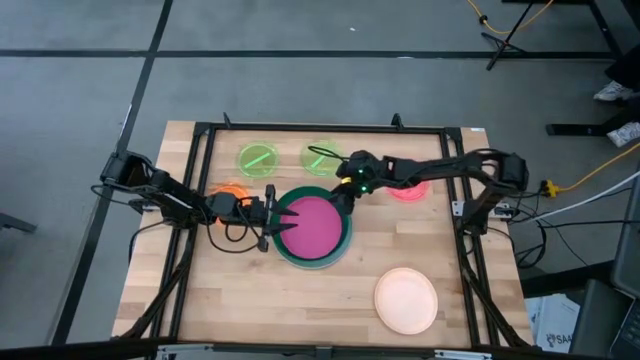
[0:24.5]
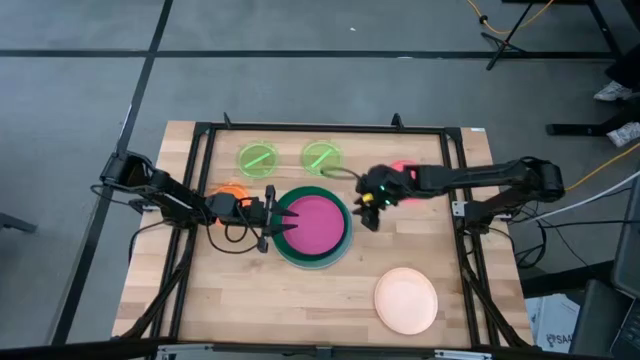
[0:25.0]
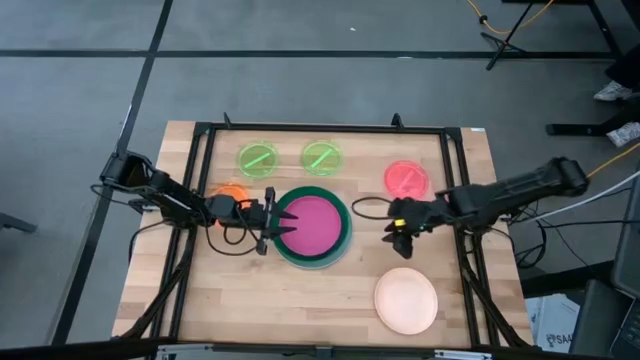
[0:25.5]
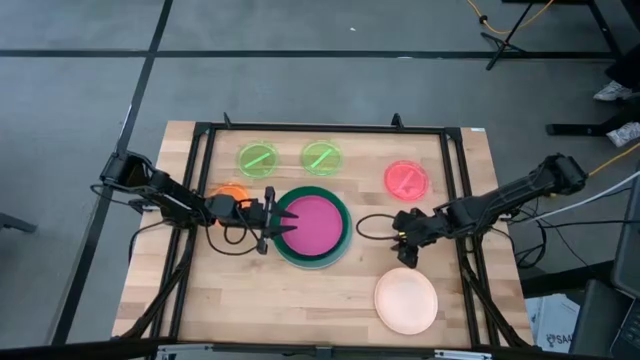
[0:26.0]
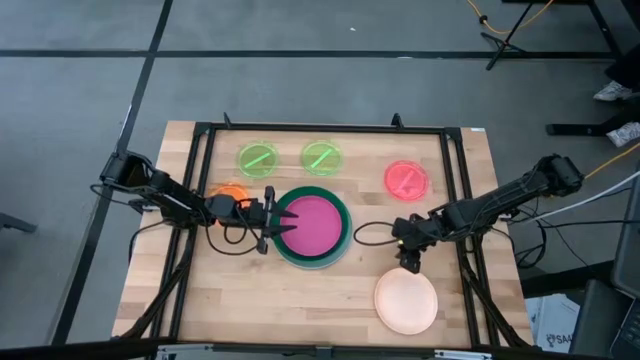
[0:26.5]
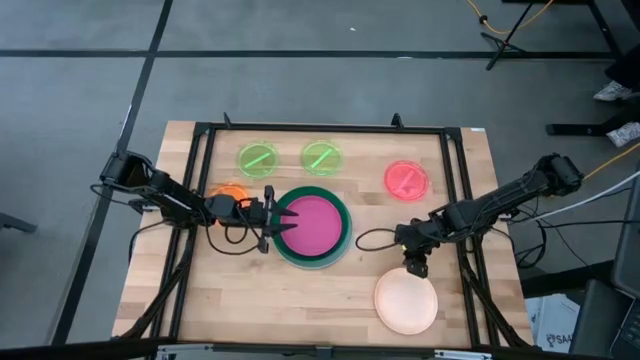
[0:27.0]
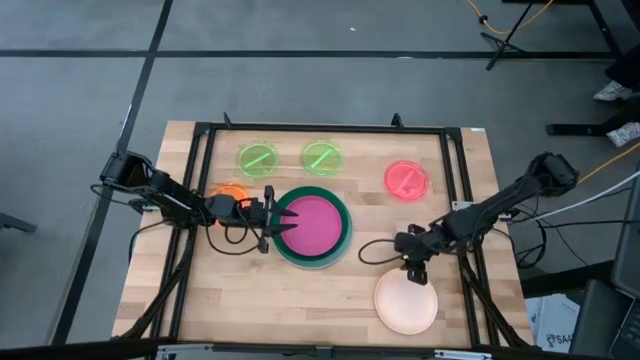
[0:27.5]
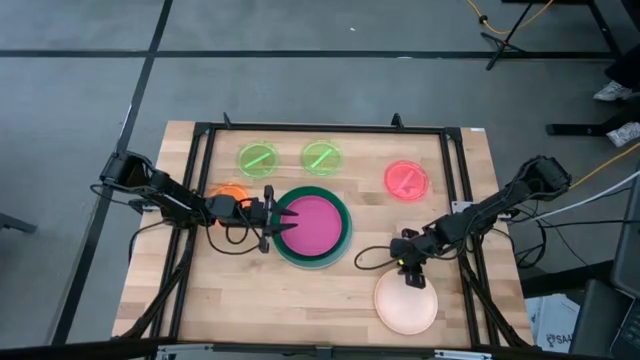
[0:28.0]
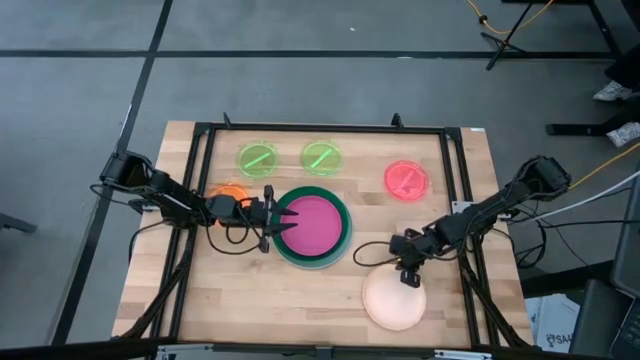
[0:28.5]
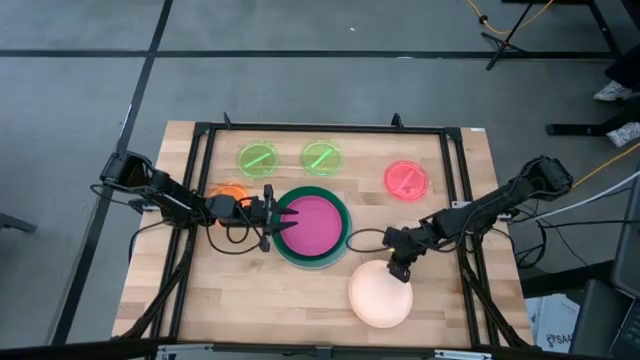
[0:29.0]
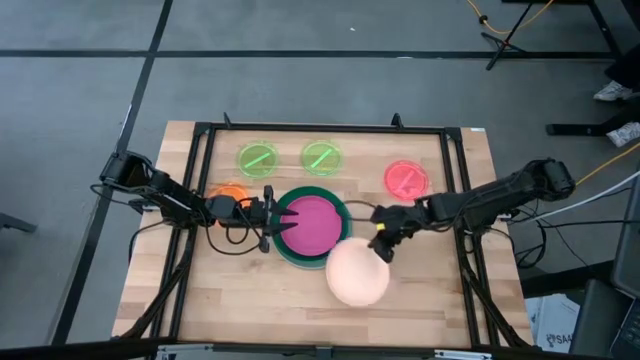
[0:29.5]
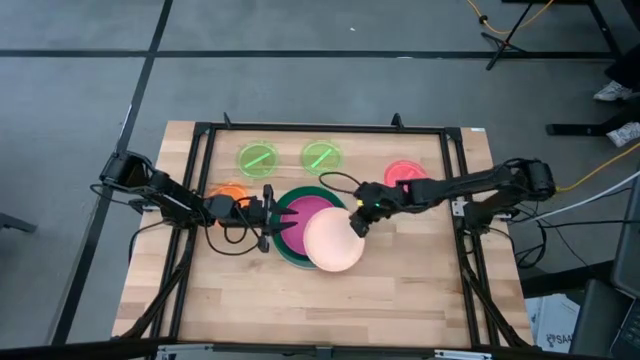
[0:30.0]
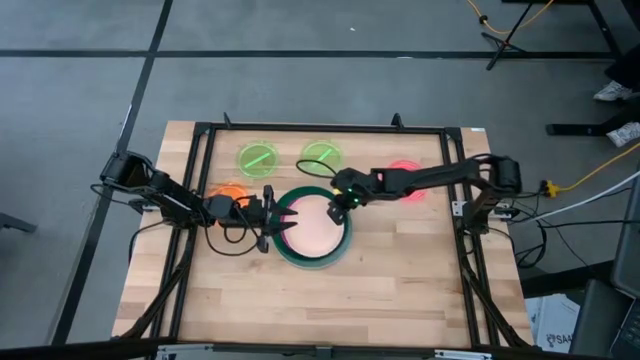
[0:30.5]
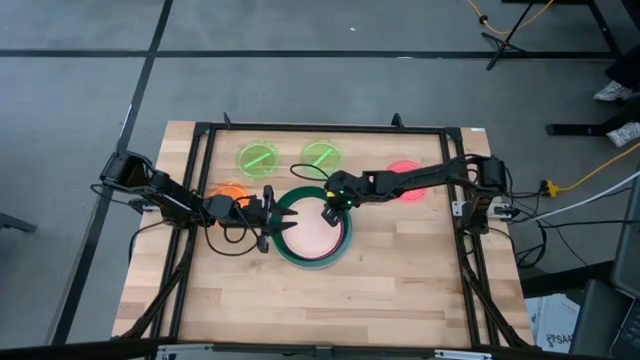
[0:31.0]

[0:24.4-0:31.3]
Task: Stack plastic plates
Stack the light brown plate on top of the pink plate

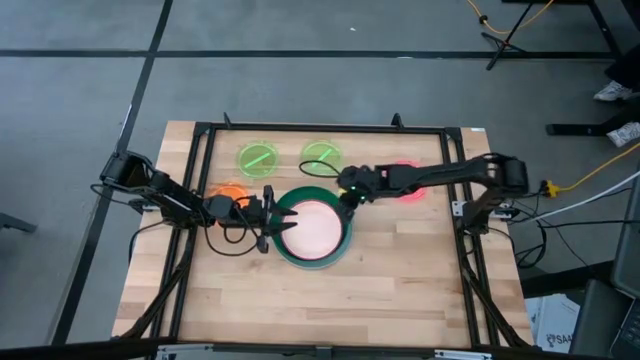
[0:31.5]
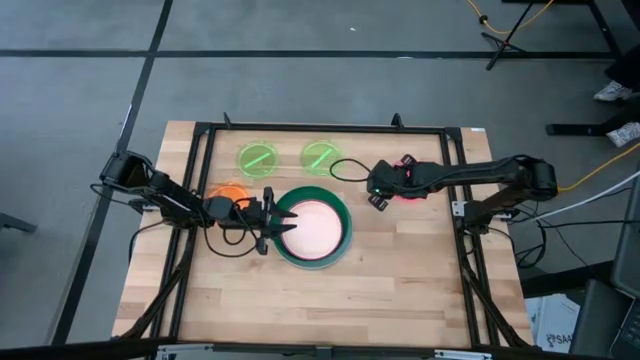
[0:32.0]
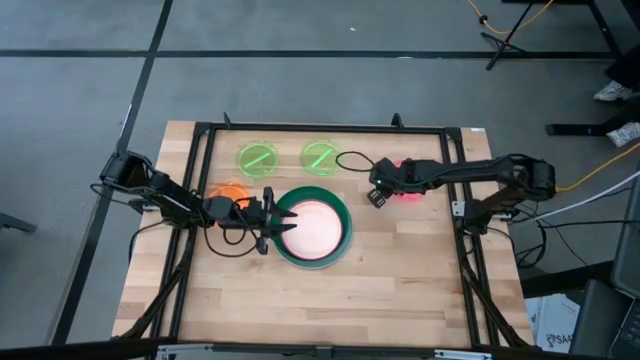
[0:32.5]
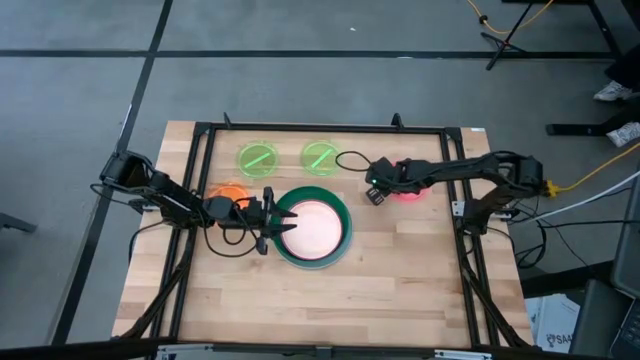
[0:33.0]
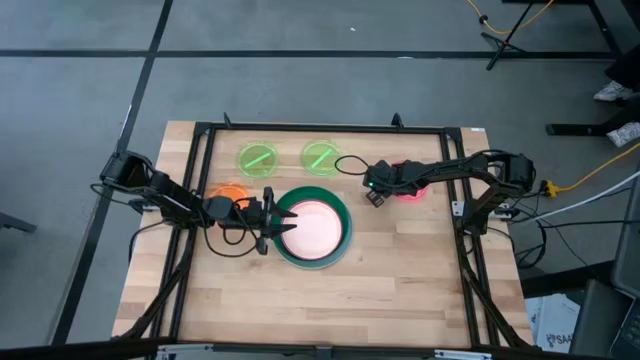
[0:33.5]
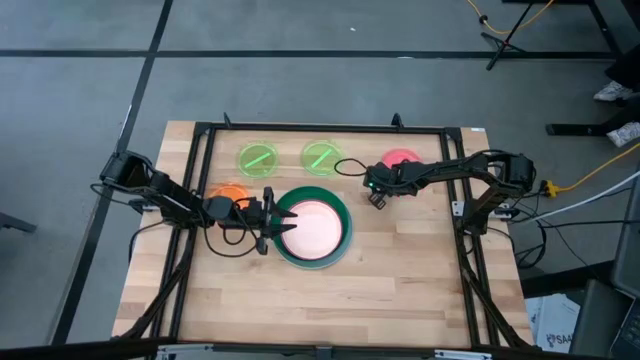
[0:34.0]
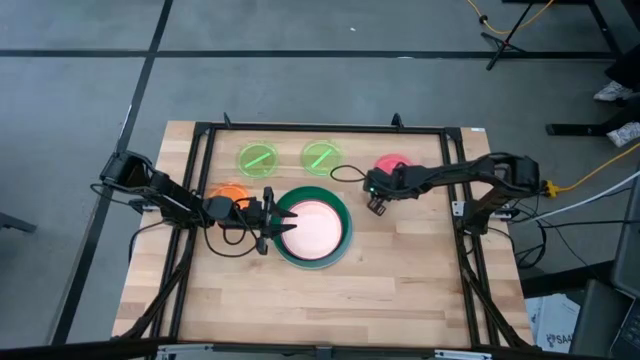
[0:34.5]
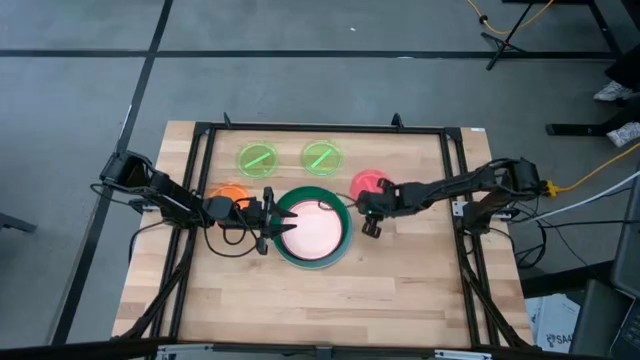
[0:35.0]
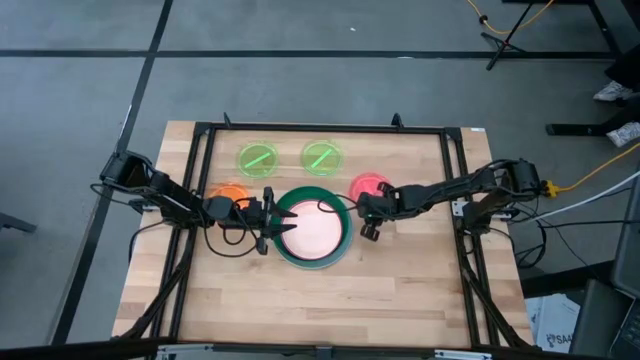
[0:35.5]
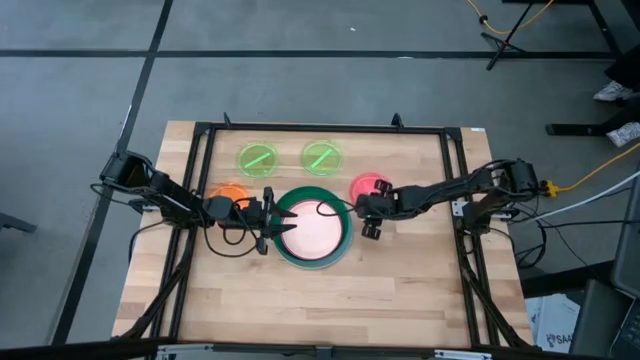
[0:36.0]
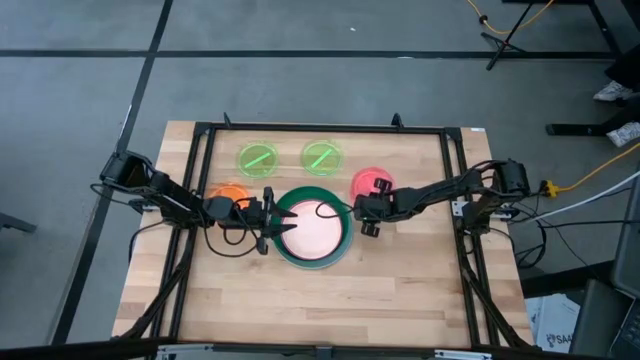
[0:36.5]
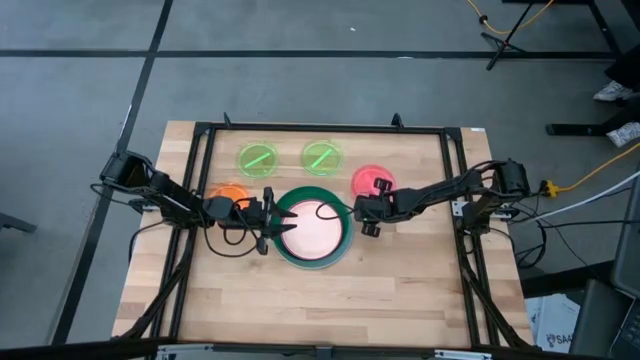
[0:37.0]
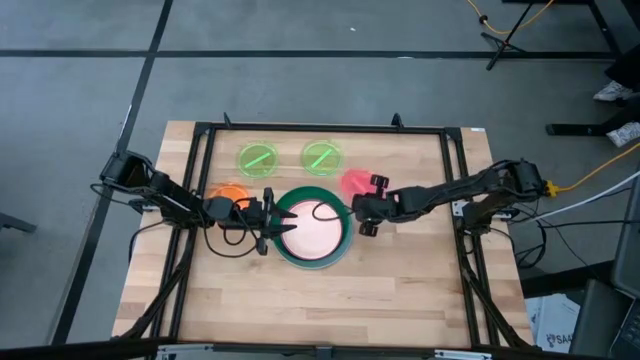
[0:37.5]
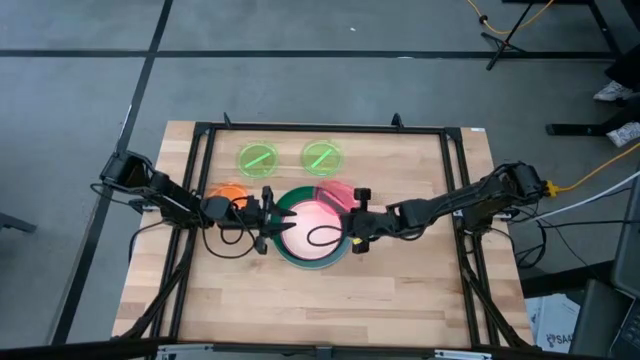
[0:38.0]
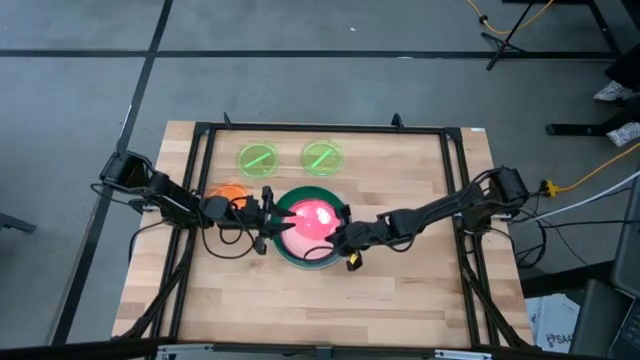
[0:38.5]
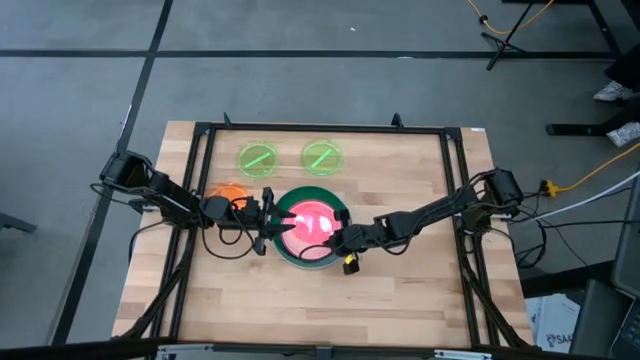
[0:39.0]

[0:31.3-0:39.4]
Stack the red transparent plate on top of the light brown plate

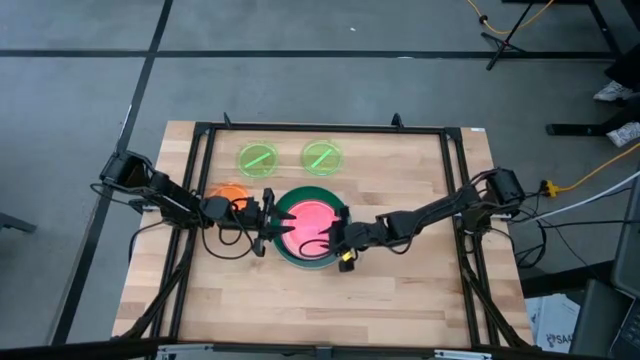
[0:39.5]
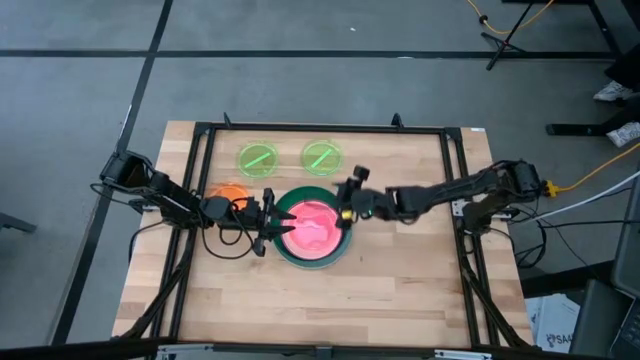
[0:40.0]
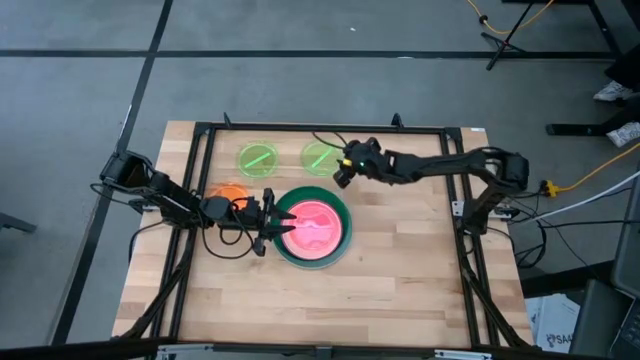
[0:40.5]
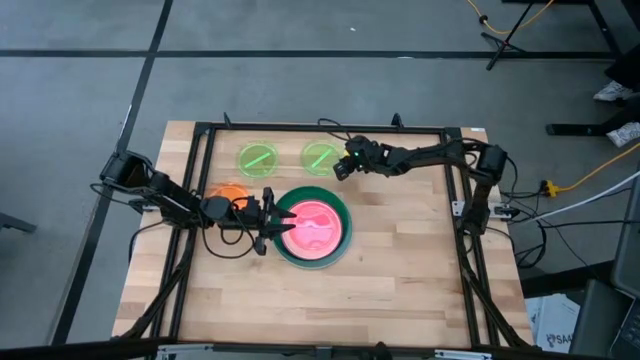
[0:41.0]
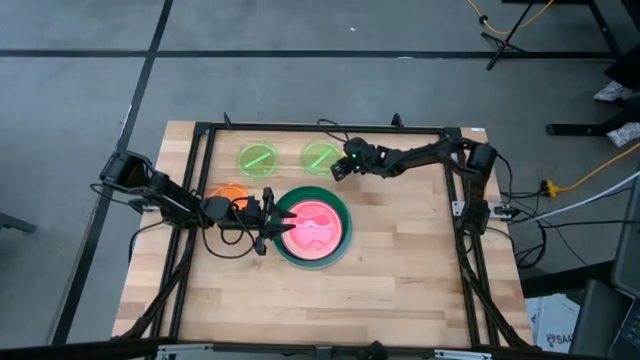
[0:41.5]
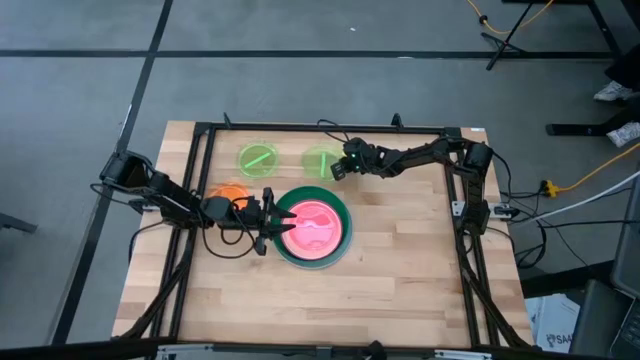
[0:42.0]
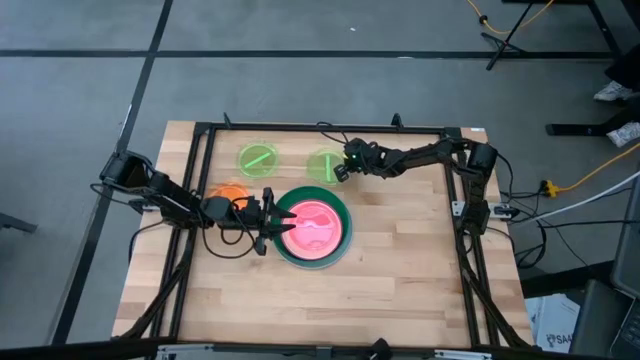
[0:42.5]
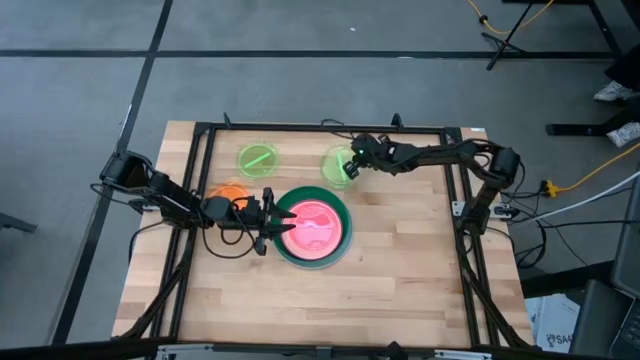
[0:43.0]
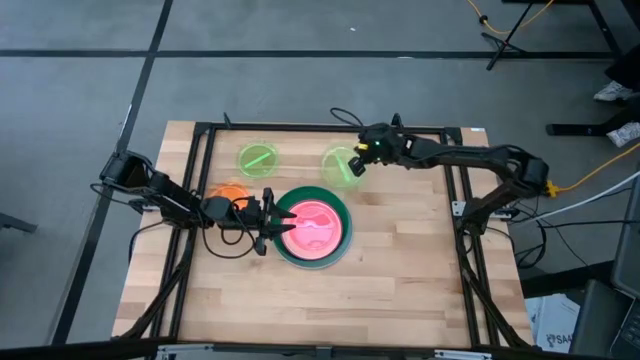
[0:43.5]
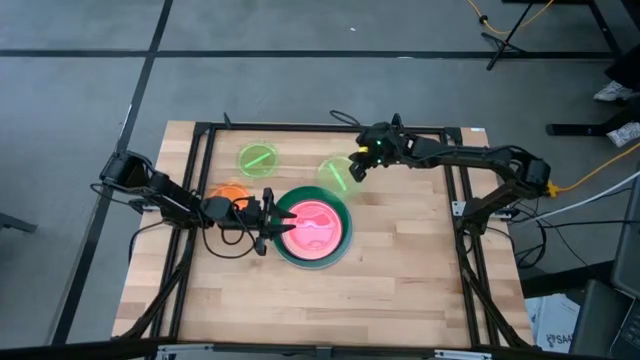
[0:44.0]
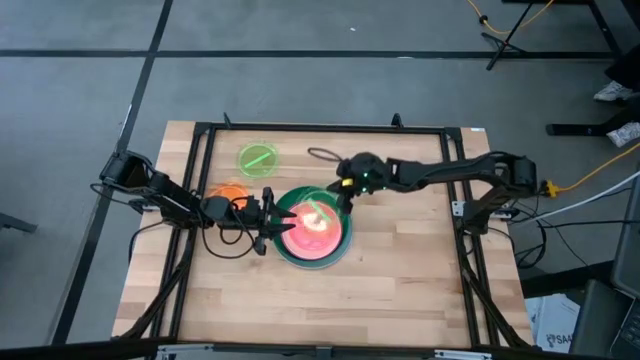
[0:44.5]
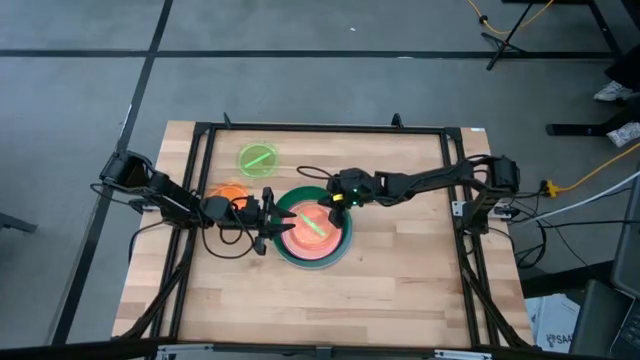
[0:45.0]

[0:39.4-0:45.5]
Stack the right green transparent plate on top of the red transparent plate
